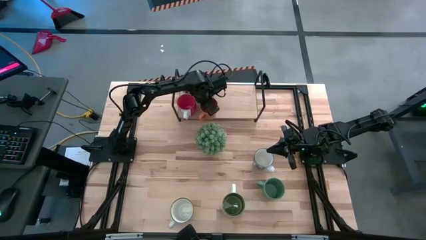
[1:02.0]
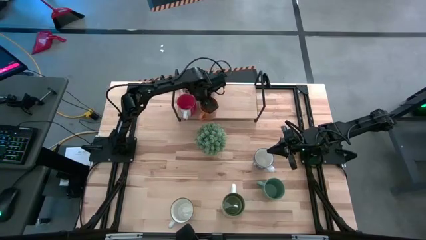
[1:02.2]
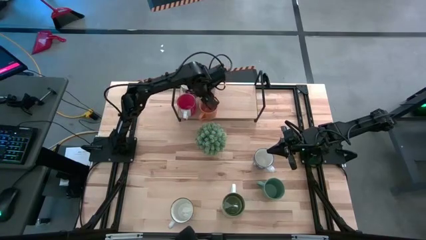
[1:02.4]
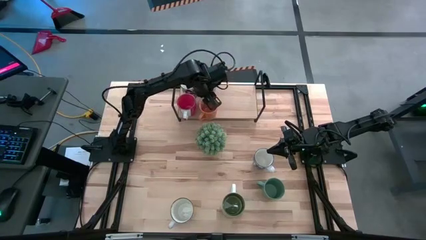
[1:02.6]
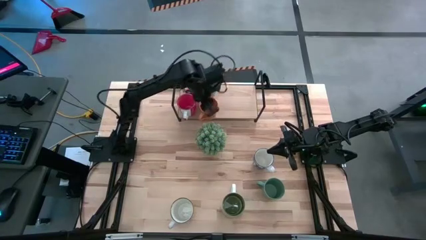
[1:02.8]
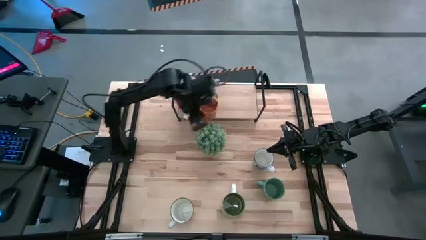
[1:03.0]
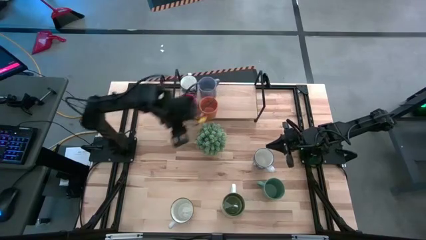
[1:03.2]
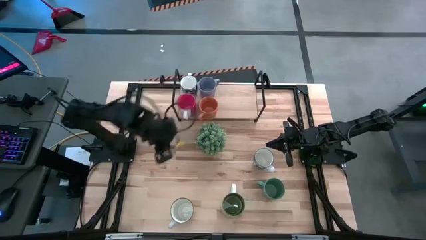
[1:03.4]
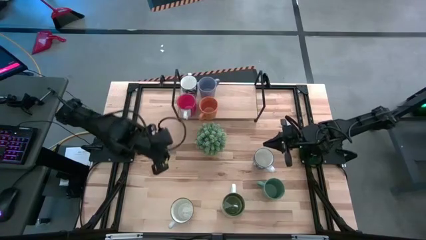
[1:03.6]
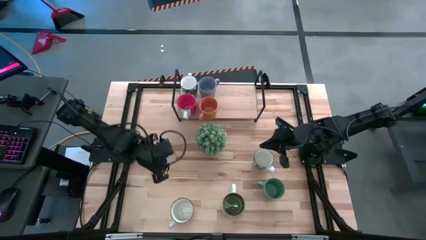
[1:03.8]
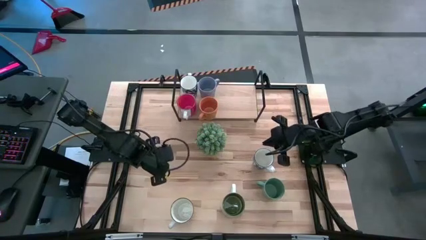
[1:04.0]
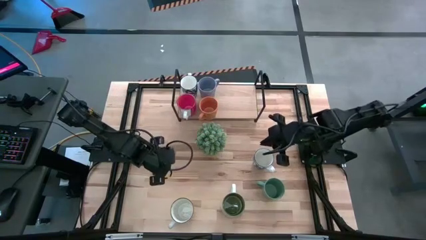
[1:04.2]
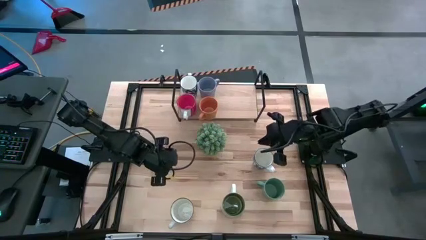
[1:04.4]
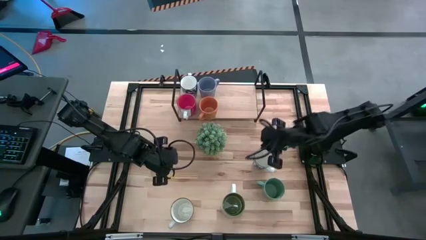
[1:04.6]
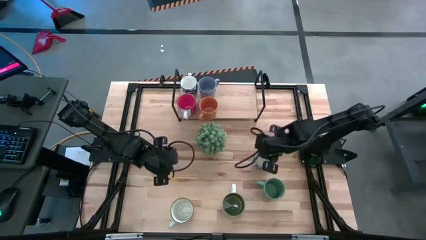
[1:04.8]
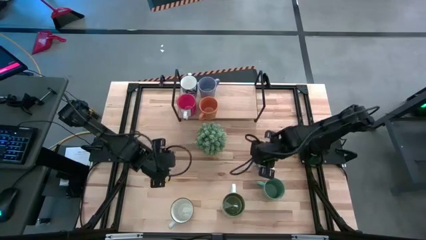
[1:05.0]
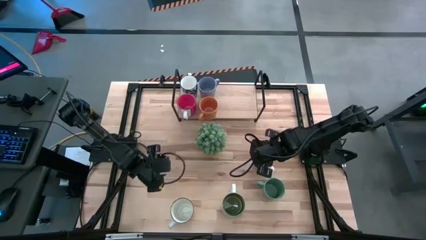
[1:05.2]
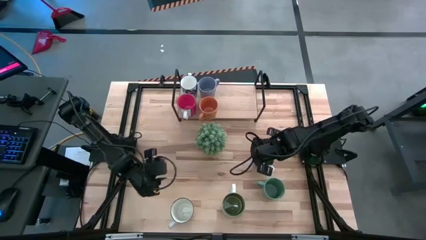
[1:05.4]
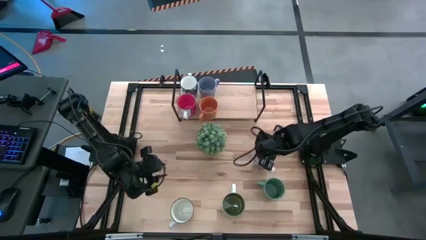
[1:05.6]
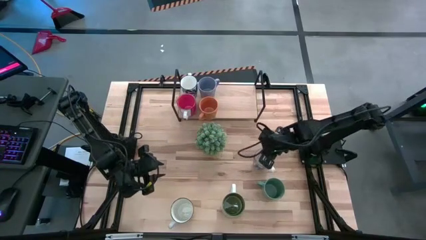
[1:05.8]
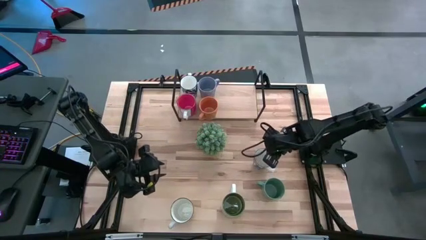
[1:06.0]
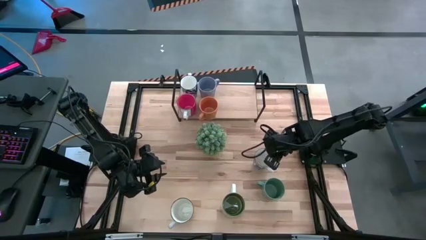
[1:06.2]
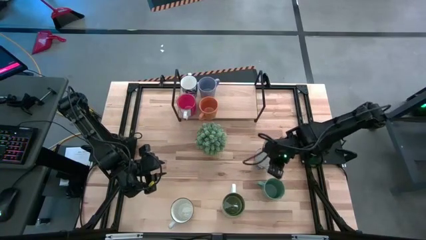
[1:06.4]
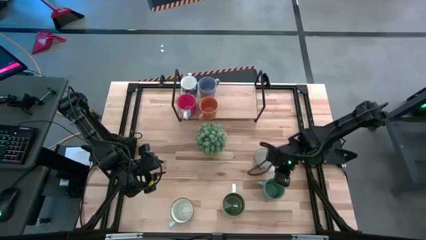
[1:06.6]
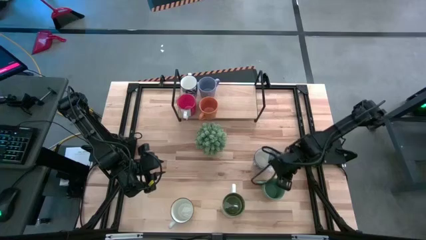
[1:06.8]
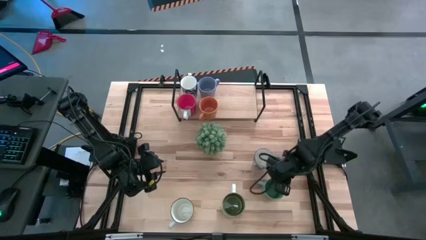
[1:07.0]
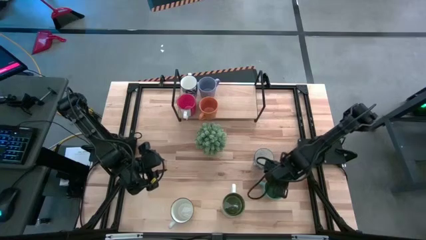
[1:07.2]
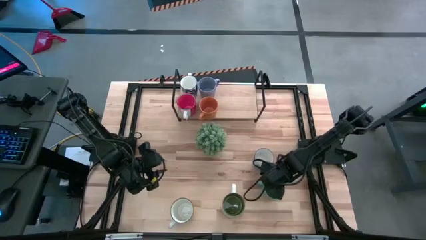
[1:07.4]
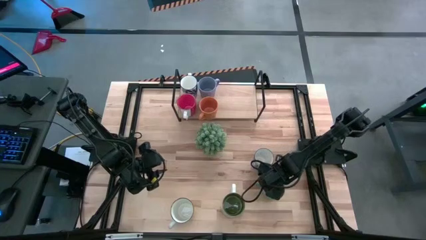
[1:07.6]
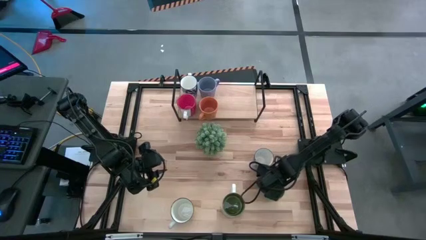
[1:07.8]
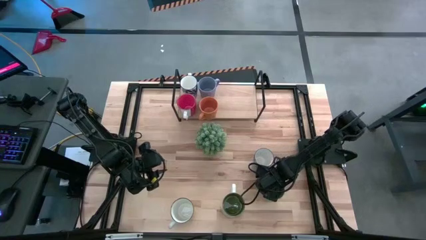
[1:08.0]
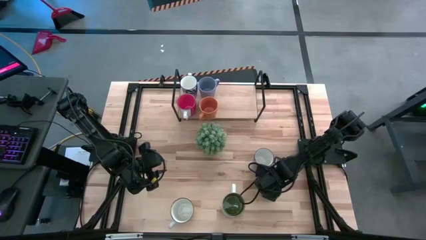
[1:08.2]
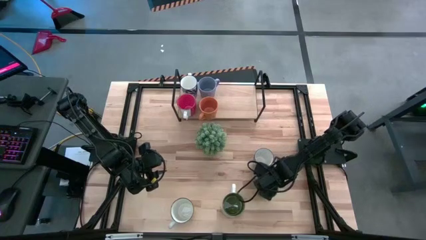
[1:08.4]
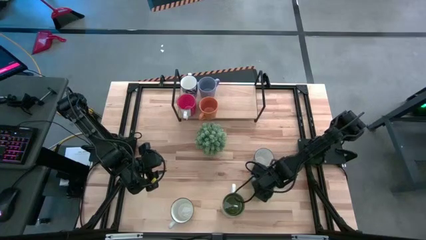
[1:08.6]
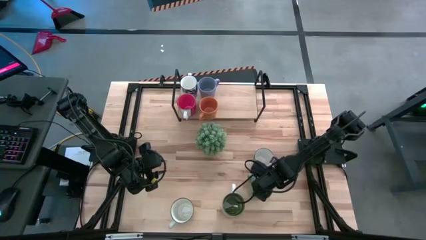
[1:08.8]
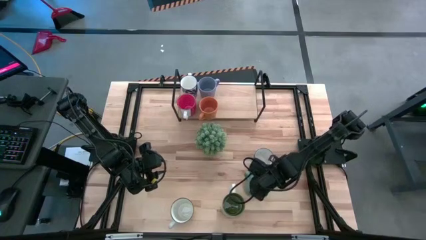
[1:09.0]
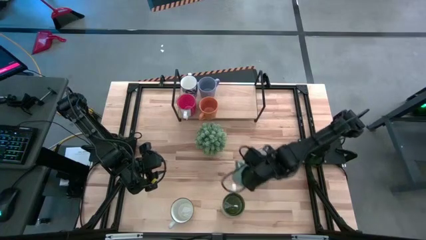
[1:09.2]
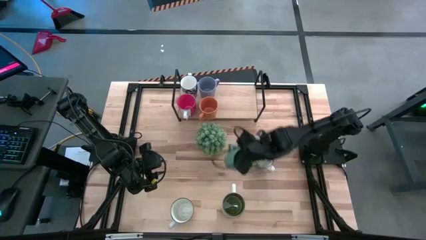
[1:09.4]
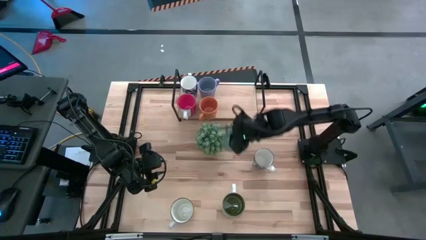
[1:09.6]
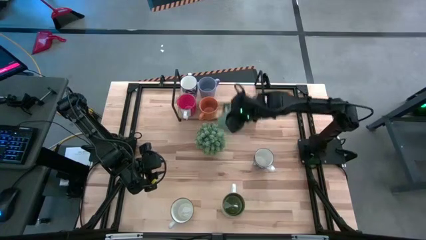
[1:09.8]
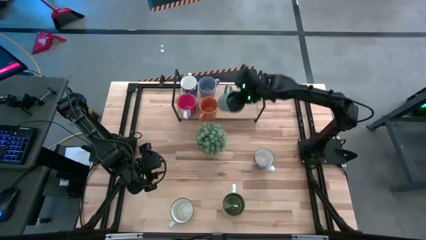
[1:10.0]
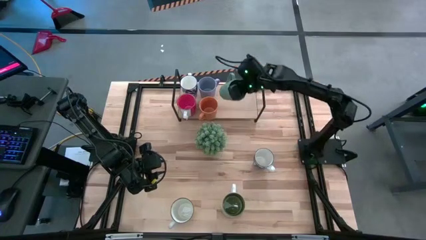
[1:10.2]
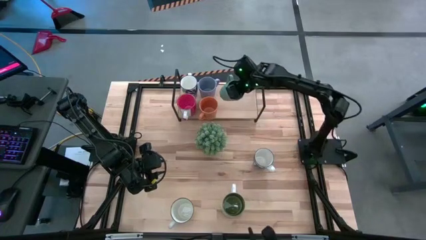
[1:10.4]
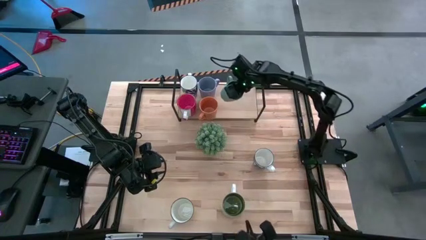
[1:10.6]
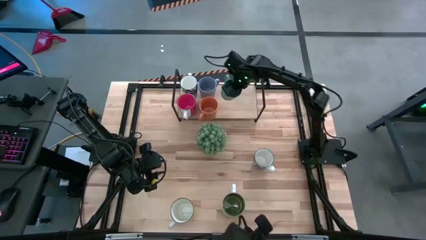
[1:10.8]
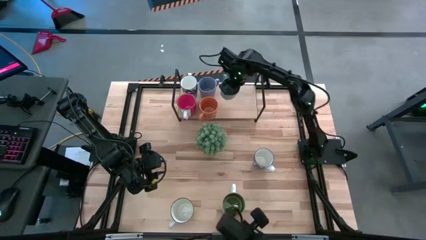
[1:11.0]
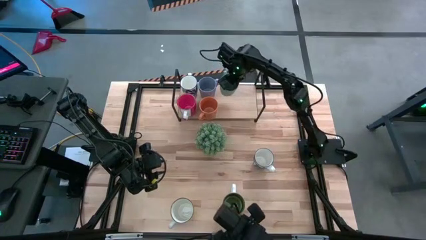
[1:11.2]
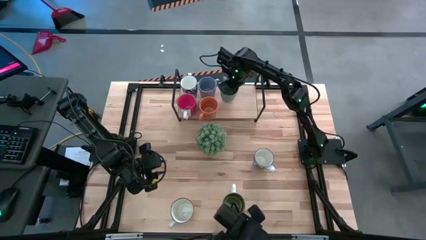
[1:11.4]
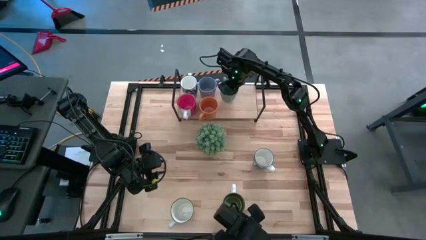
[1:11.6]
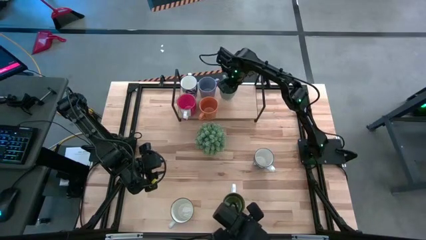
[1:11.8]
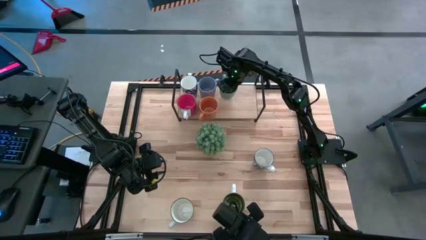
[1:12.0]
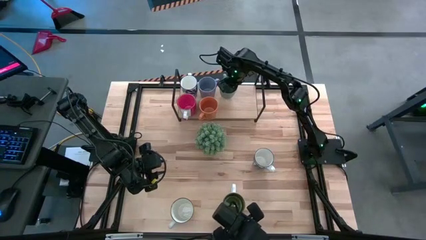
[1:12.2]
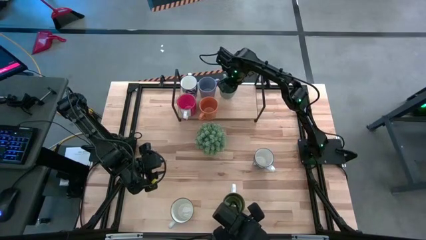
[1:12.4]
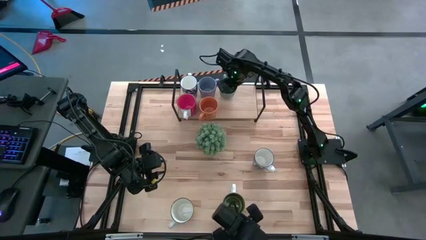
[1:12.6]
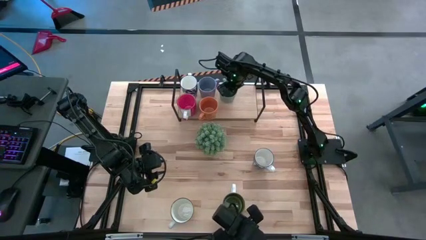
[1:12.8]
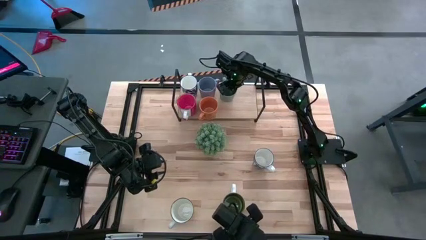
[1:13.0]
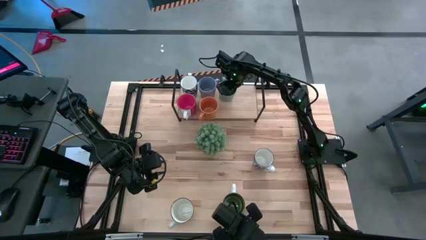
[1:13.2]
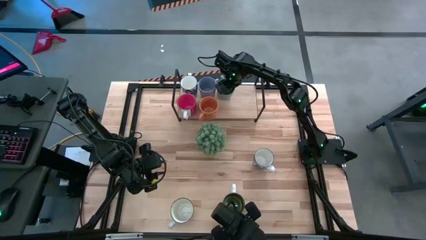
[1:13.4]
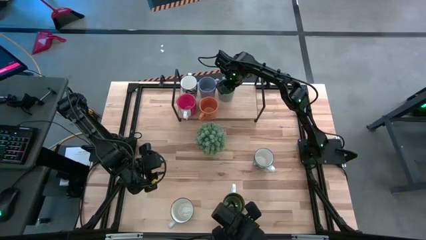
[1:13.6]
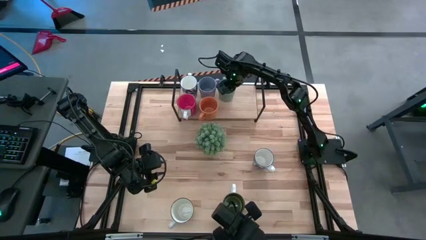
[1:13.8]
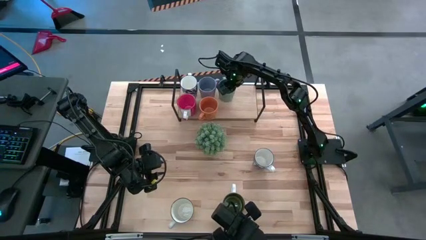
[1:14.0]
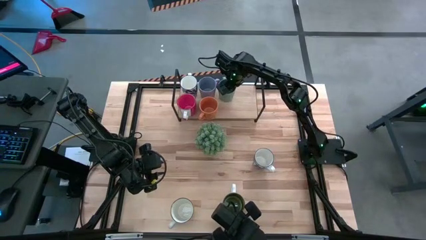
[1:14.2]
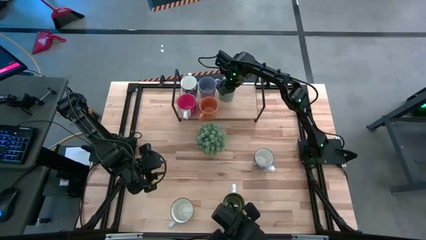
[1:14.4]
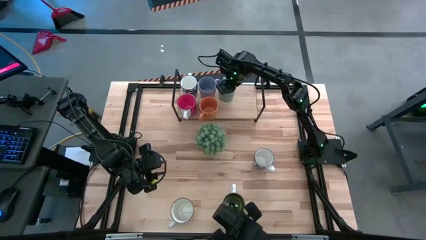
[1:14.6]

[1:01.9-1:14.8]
Task: Place coffee mugs
Put the light green mug on the shelf
